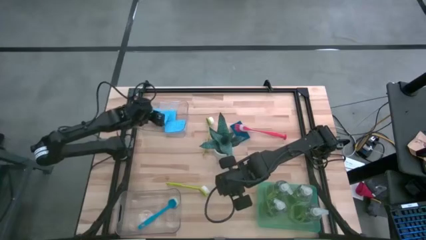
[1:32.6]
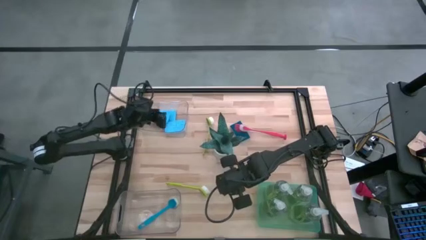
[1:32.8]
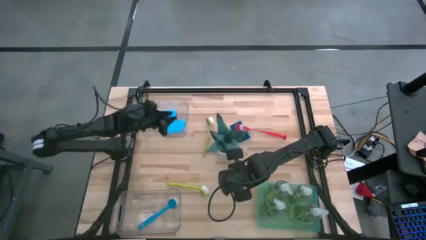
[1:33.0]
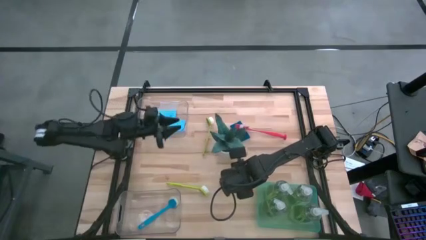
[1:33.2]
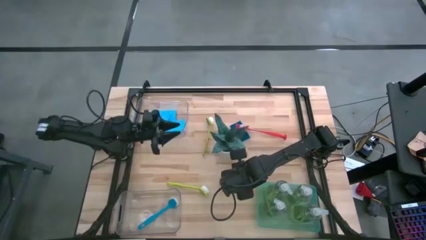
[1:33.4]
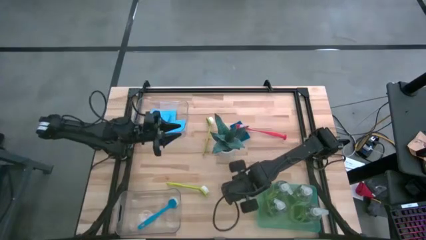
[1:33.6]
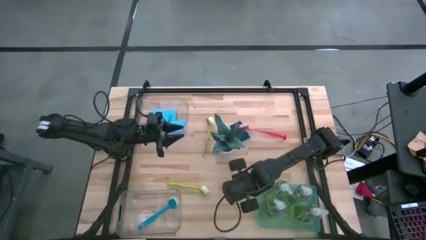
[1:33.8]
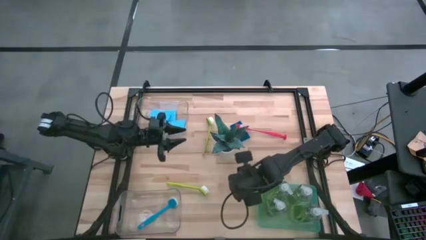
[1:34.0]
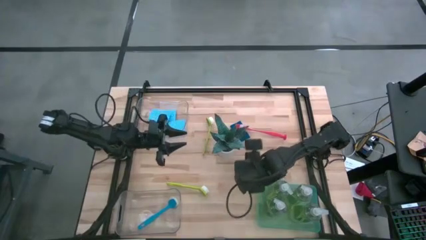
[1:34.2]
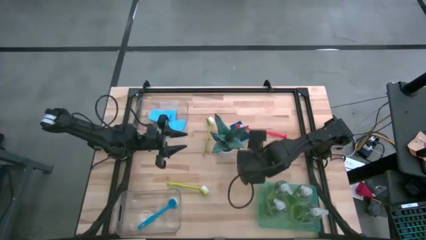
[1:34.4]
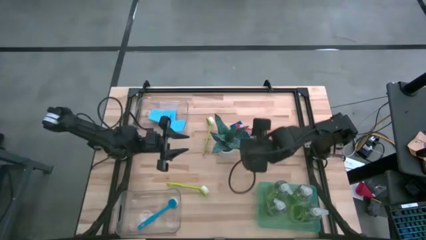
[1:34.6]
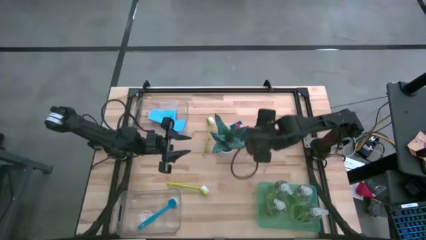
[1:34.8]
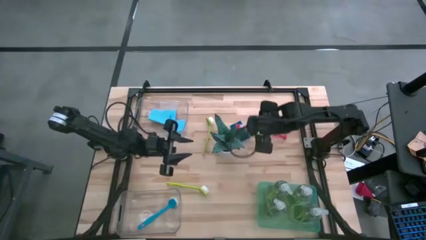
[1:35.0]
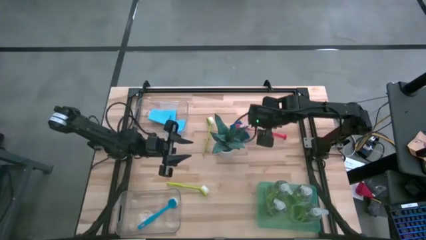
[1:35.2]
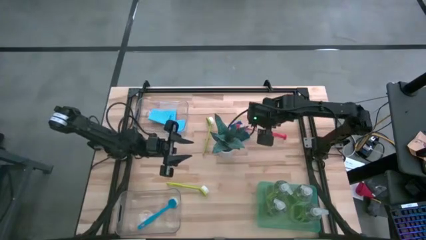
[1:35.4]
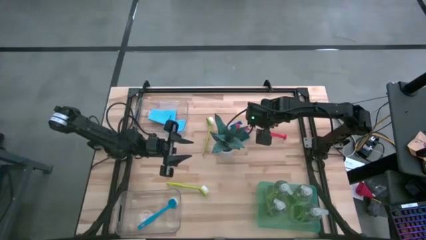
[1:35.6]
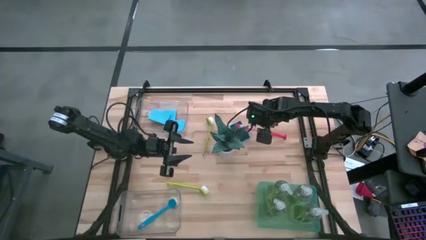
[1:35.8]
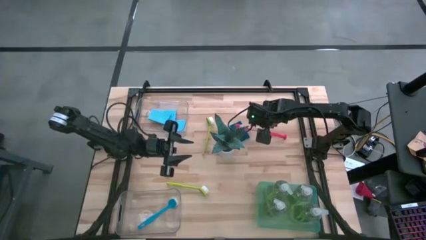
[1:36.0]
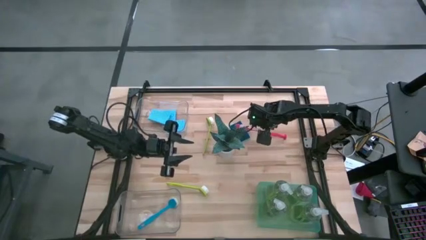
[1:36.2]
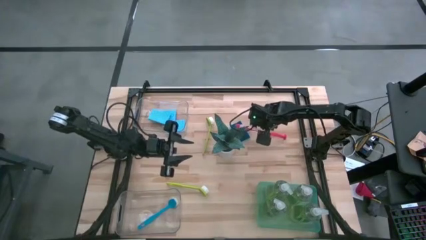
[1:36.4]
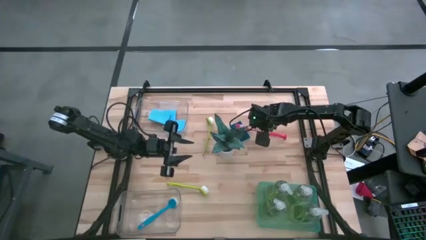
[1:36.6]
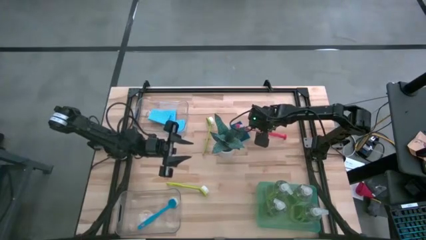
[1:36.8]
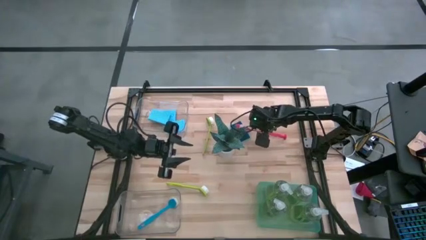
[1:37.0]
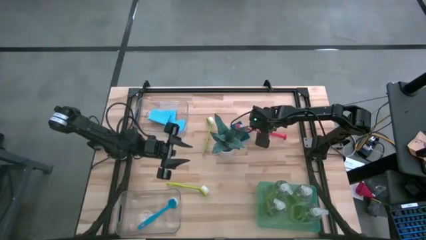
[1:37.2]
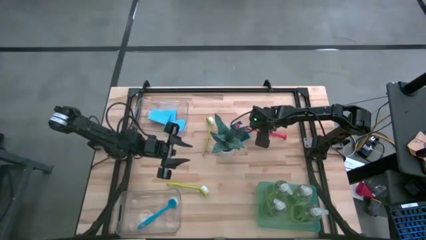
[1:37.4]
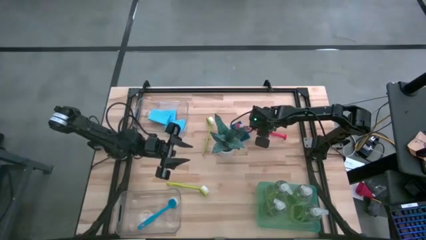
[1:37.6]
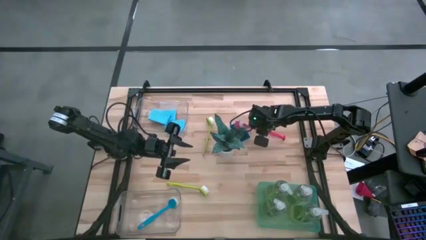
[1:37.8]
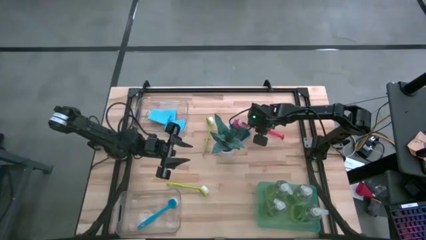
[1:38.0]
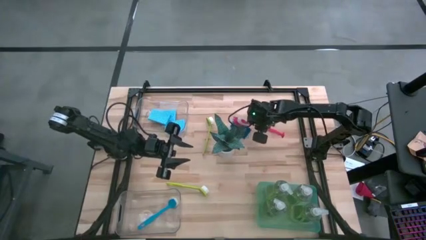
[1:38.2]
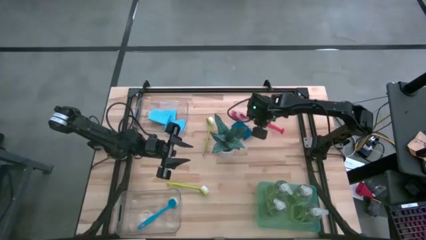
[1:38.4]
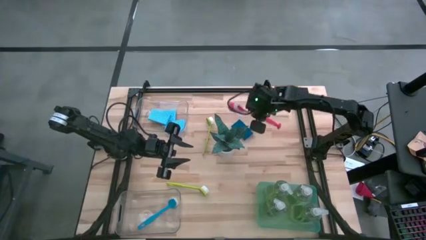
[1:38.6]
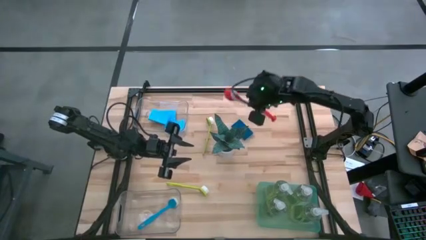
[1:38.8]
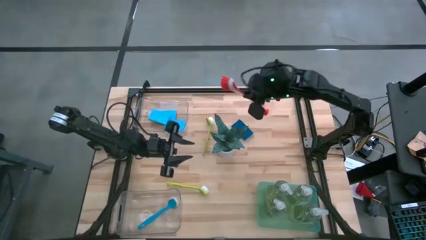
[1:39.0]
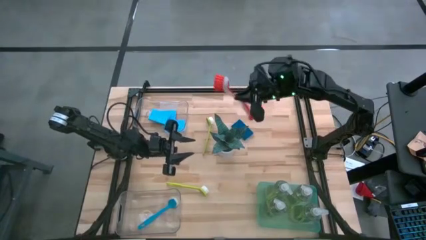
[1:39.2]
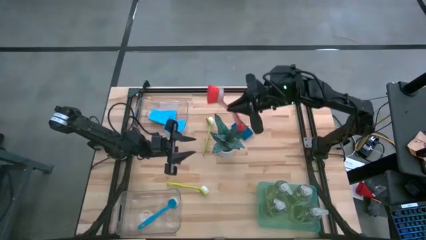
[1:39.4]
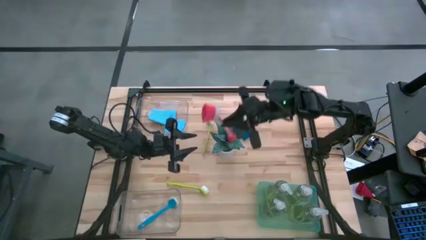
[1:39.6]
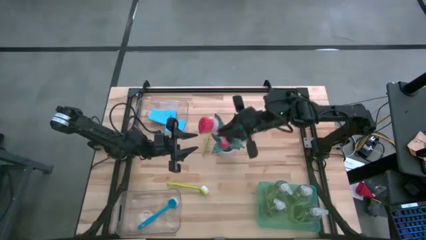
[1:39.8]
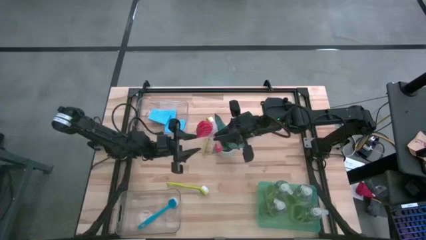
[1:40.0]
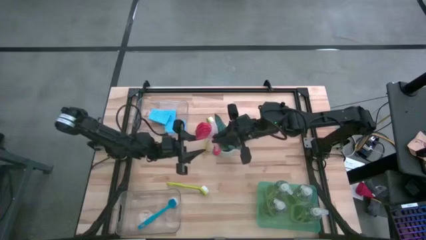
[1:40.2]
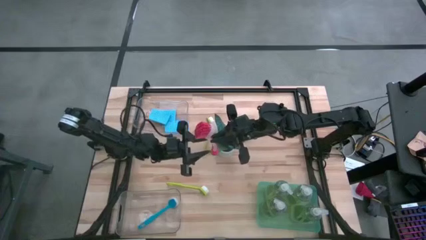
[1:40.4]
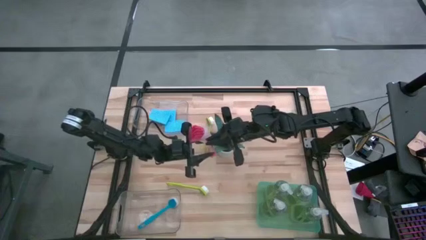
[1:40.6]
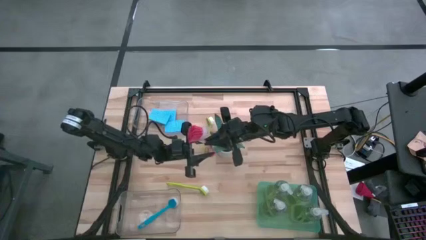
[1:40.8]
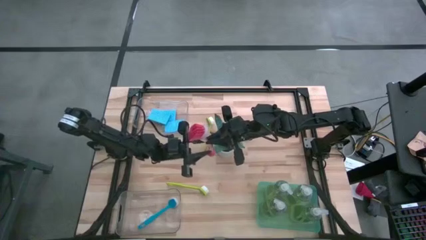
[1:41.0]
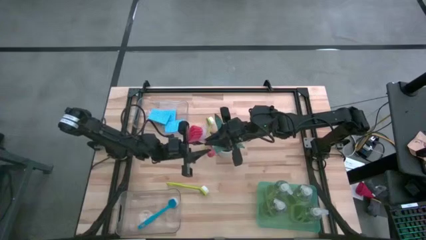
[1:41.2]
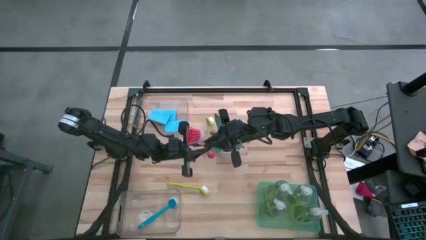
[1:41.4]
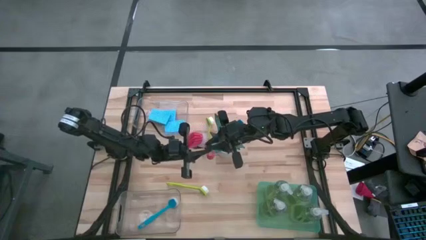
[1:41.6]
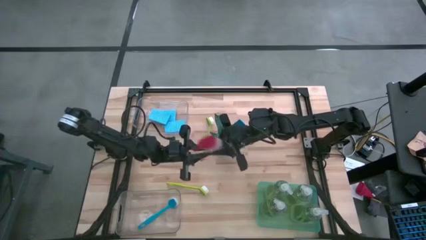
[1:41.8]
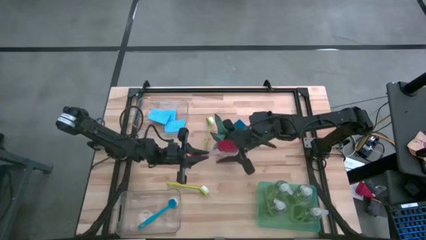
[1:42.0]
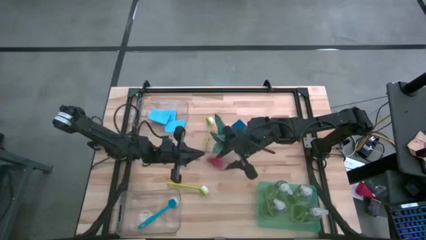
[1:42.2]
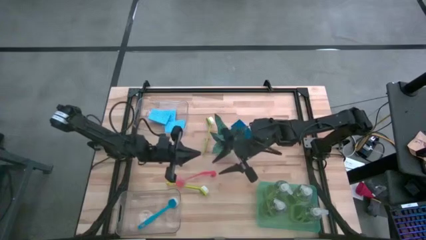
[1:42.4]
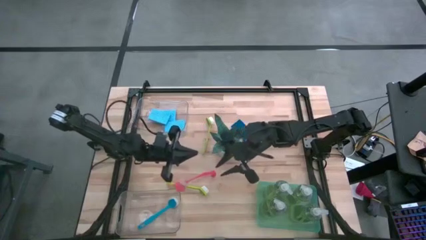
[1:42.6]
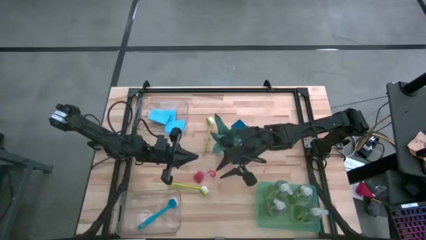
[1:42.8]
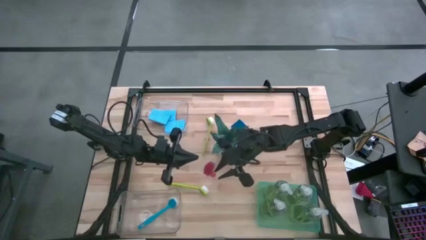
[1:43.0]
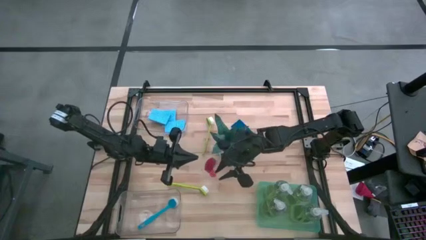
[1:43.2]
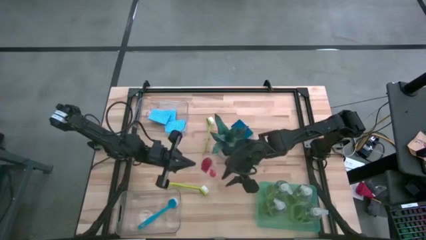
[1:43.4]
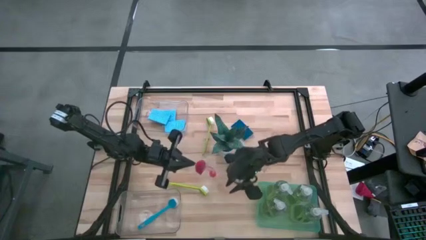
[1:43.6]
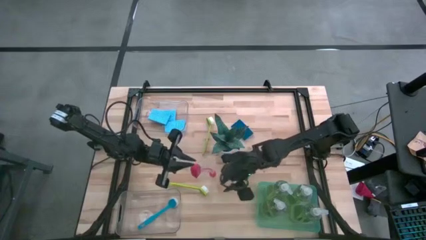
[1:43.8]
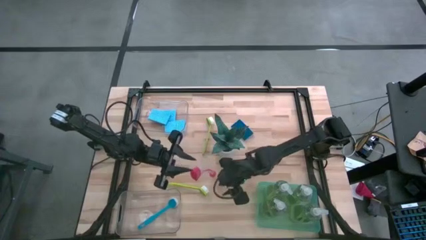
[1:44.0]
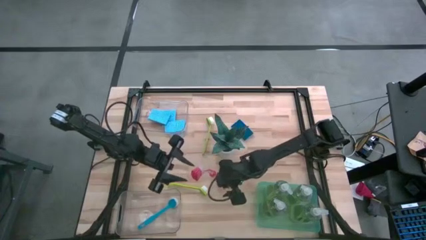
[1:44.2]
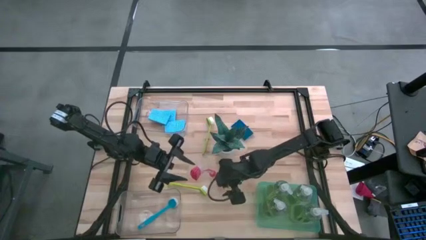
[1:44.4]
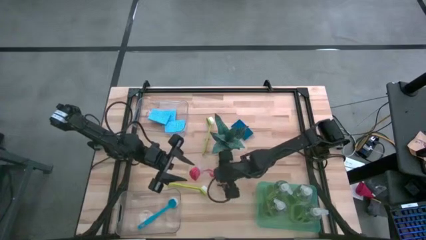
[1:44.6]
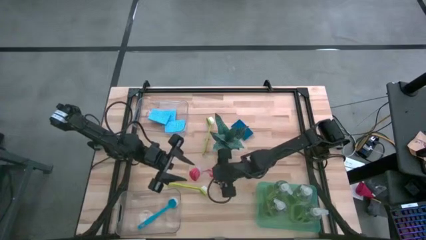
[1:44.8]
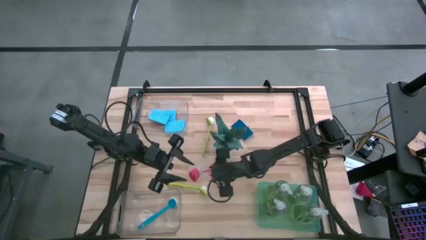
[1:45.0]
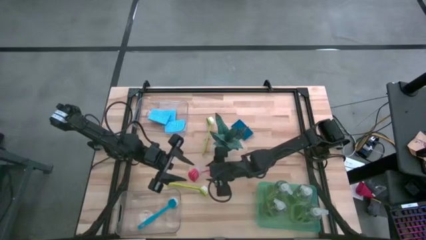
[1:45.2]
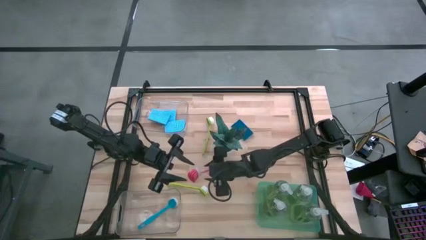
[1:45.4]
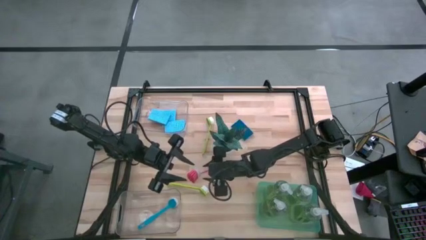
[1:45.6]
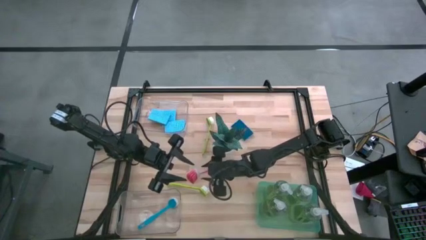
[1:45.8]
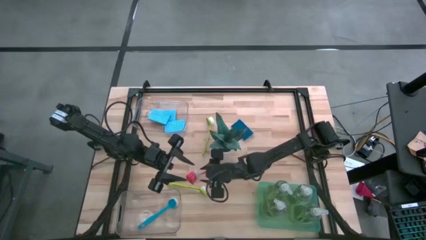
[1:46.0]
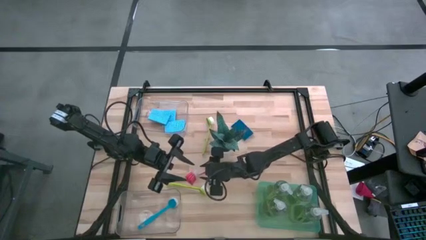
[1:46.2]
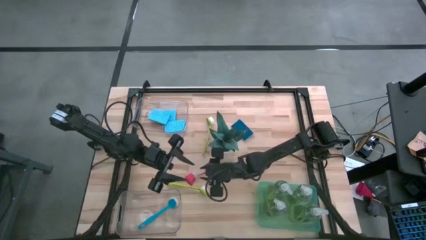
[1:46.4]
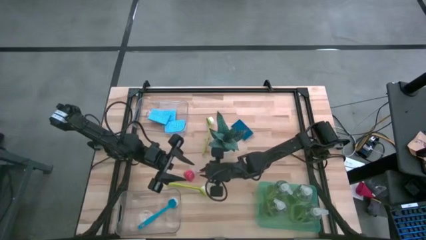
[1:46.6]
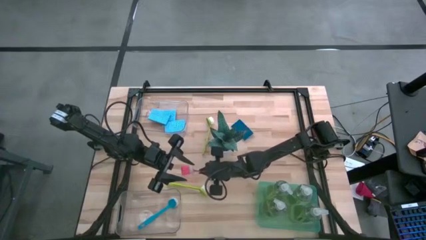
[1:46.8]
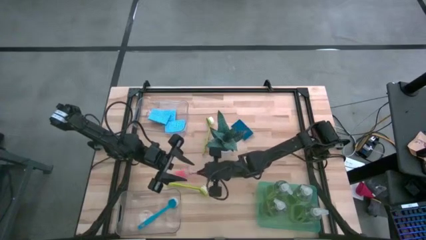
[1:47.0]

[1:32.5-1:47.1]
Task: Pick & Place Kitchen Sink Supplies
Put the red dish brush into the bottom transparent bin

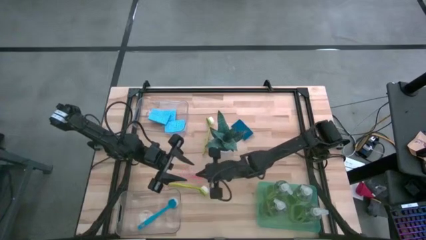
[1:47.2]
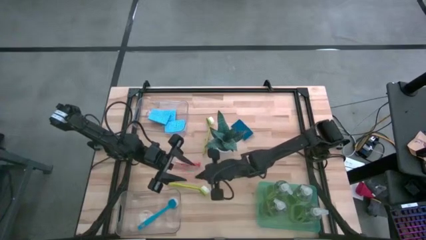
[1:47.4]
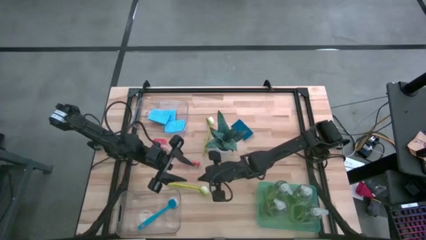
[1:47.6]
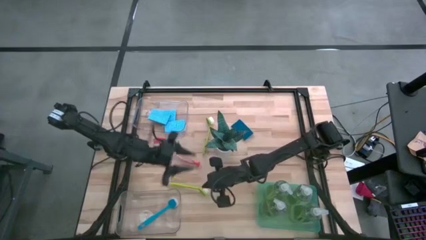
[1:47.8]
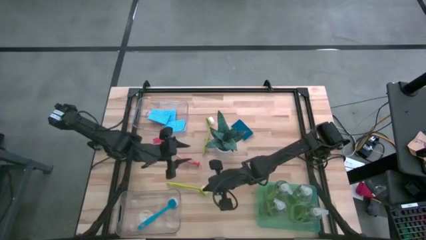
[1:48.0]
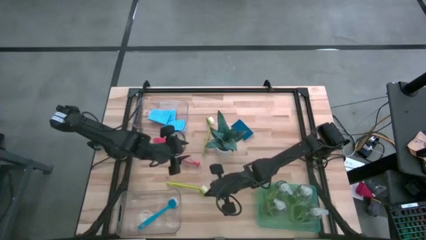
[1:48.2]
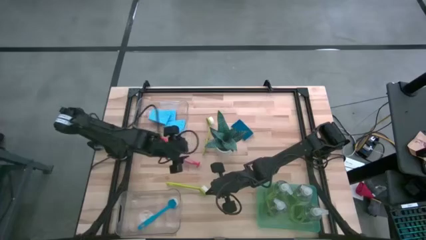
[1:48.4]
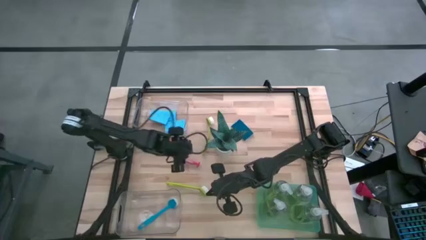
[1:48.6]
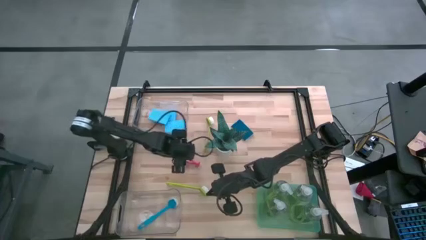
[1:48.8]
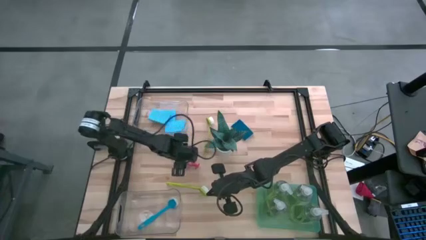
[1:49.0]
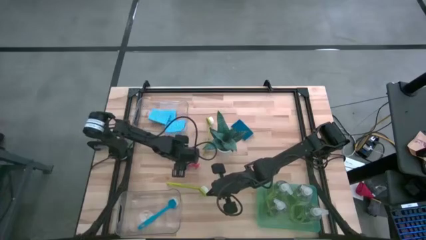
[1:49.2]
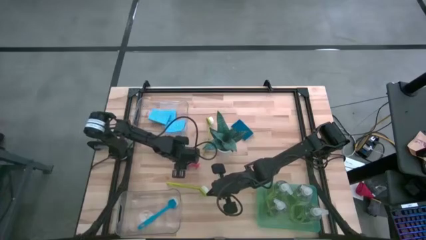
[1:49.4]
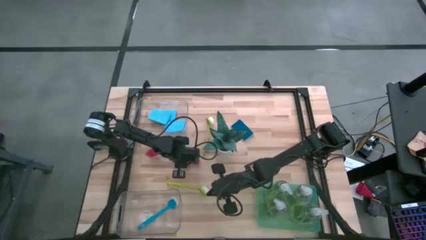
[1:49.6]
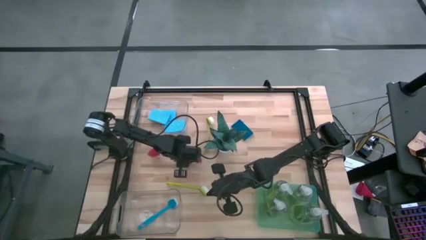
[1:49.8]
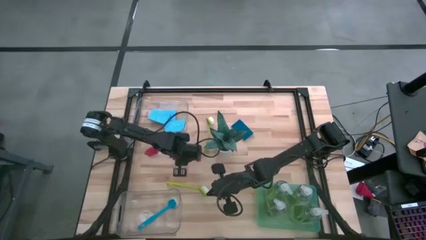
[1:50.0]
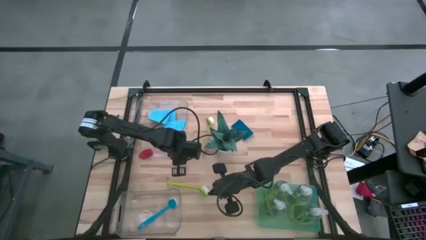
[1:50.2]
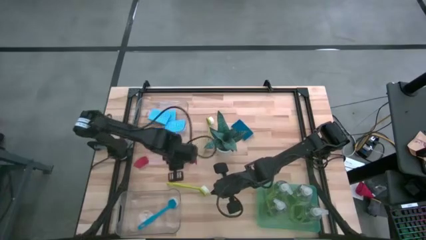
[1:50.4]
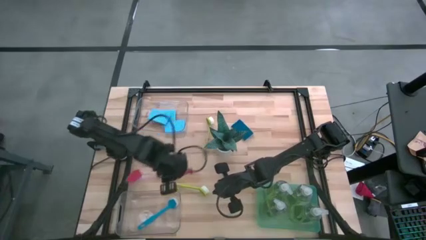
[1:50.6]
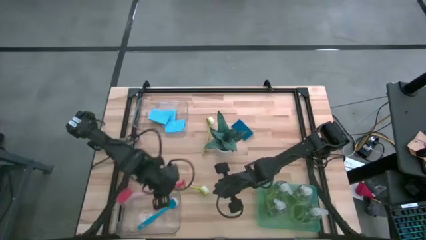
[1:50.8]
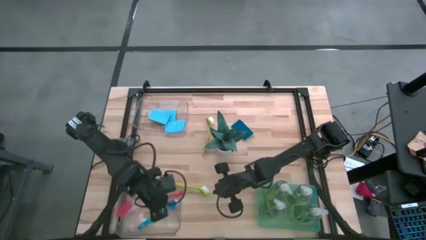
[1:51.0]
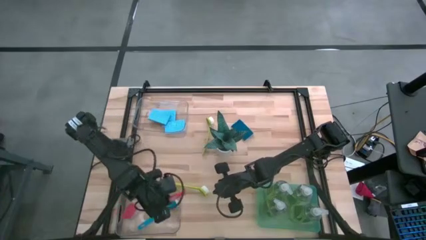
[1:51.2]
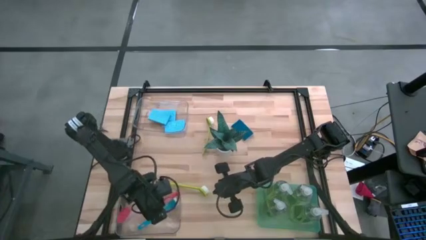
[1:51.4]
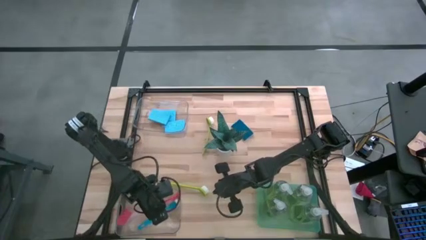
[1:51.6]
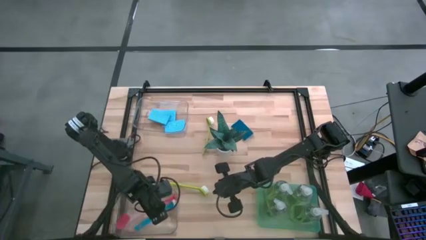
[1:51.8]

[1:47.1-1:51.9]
Put the red dish brush into the bottom transparent bin
